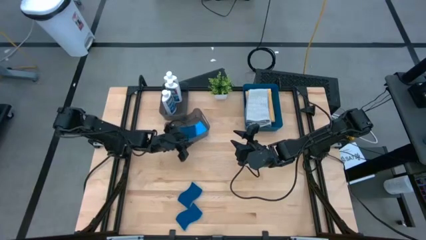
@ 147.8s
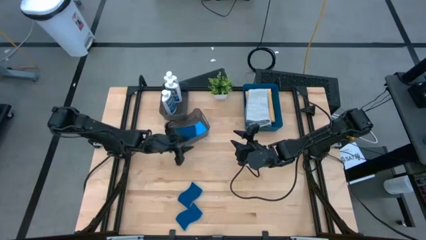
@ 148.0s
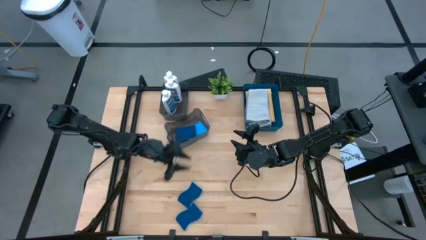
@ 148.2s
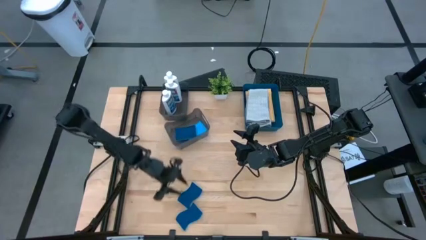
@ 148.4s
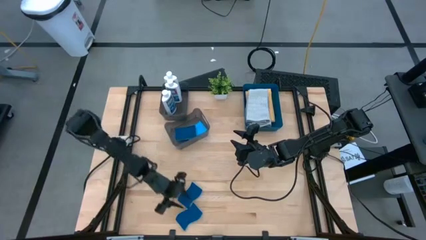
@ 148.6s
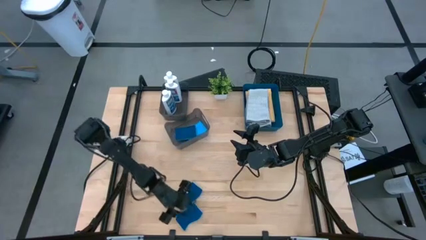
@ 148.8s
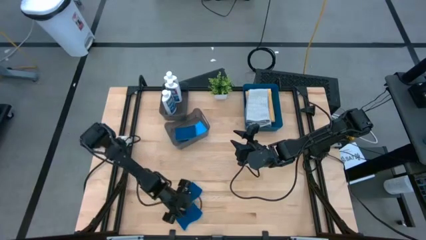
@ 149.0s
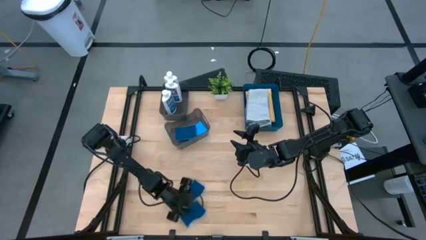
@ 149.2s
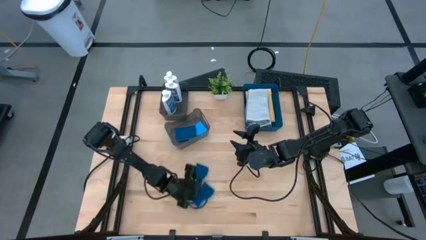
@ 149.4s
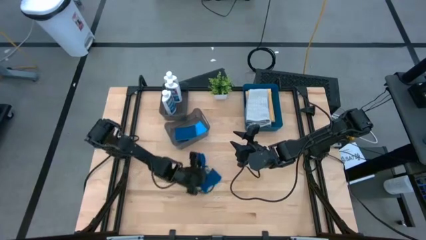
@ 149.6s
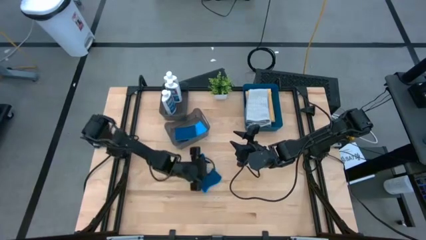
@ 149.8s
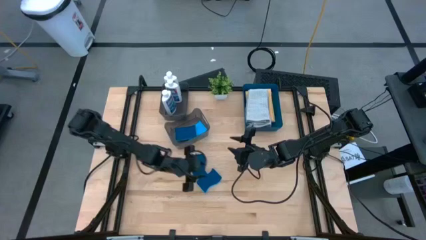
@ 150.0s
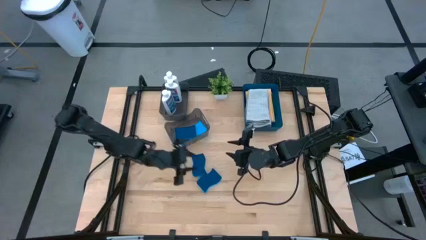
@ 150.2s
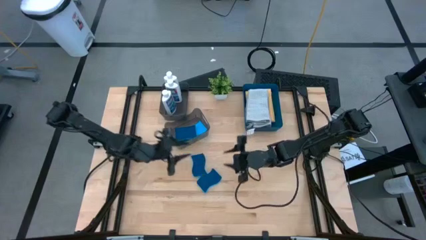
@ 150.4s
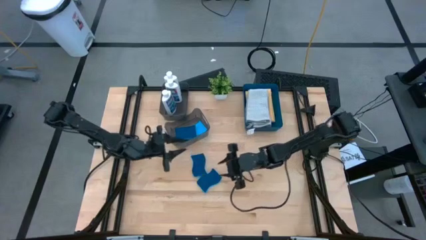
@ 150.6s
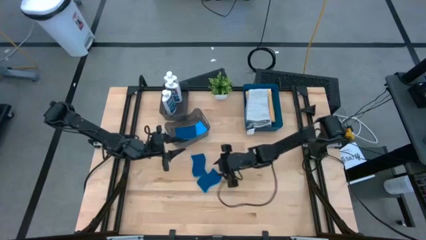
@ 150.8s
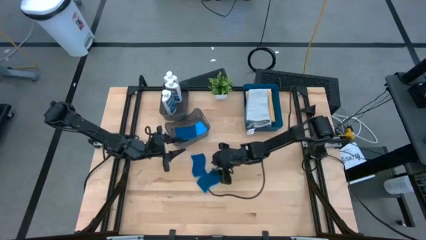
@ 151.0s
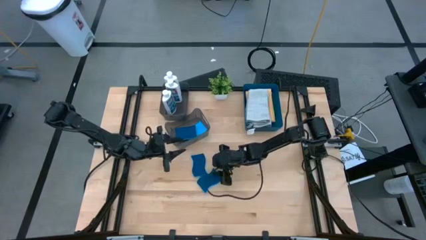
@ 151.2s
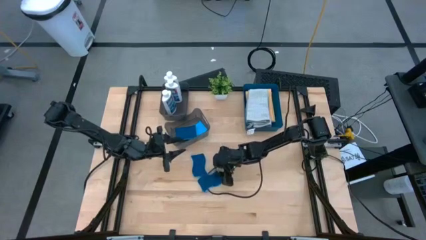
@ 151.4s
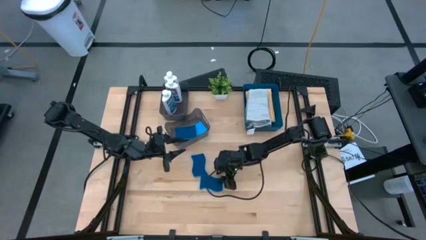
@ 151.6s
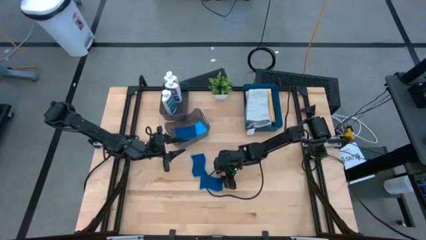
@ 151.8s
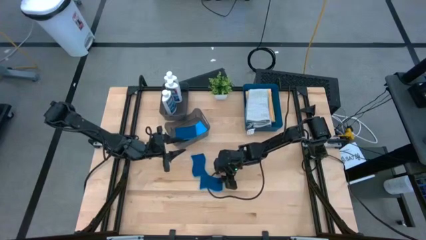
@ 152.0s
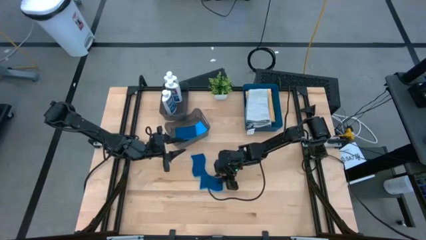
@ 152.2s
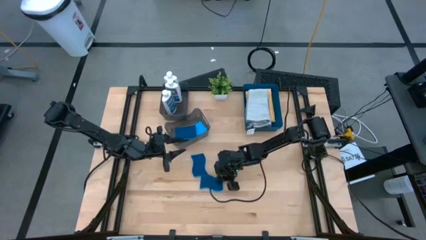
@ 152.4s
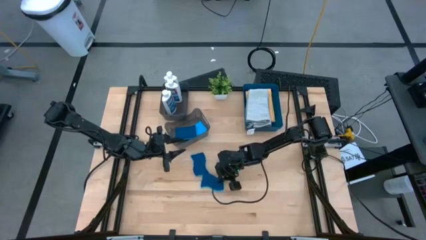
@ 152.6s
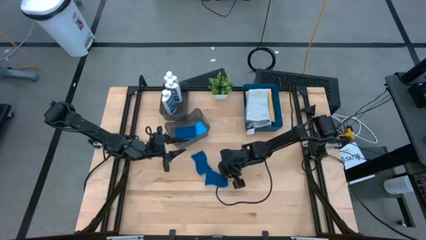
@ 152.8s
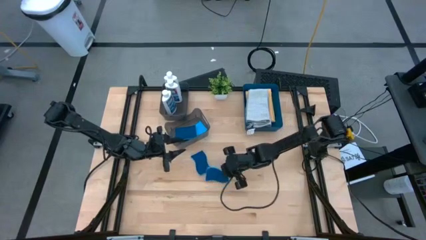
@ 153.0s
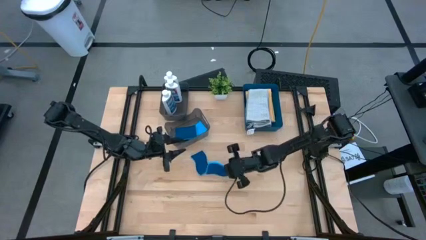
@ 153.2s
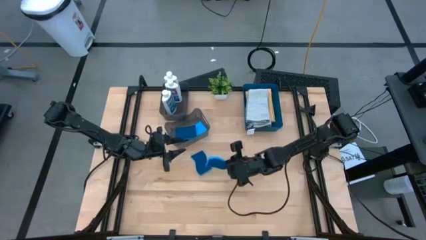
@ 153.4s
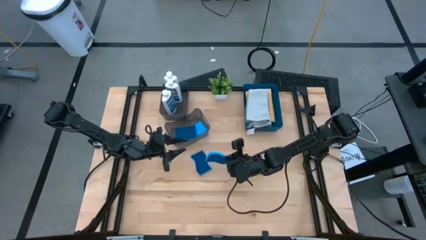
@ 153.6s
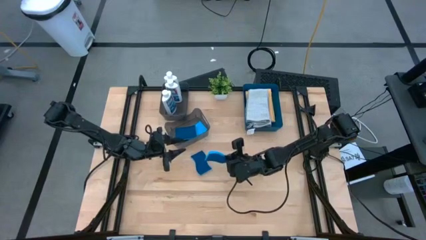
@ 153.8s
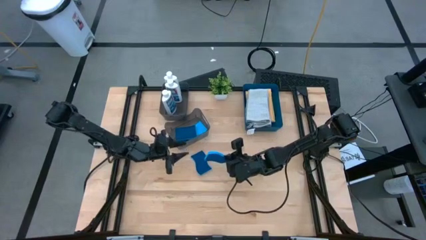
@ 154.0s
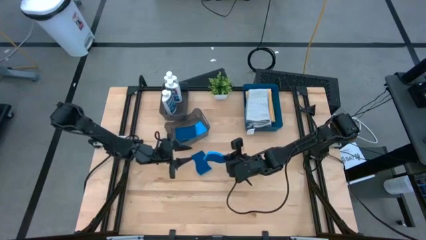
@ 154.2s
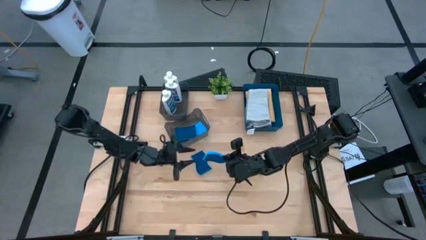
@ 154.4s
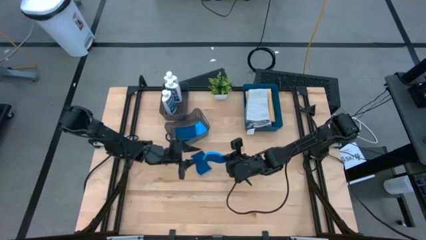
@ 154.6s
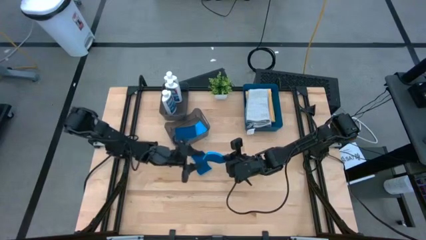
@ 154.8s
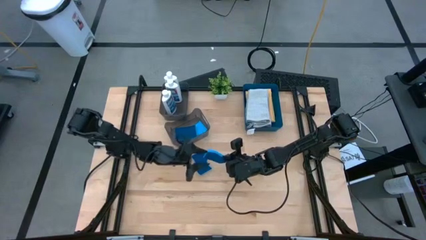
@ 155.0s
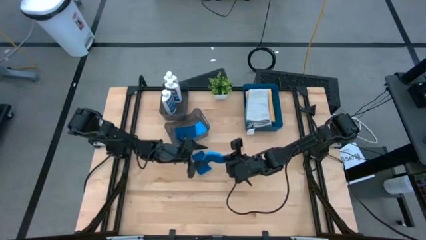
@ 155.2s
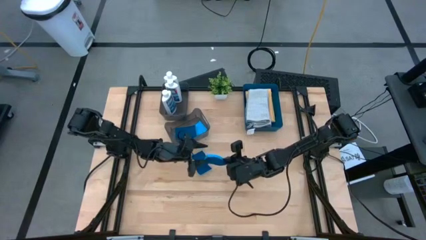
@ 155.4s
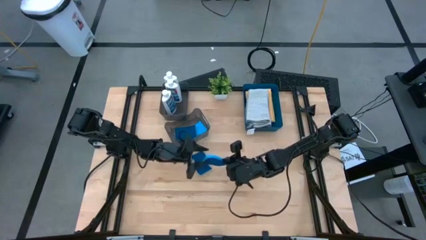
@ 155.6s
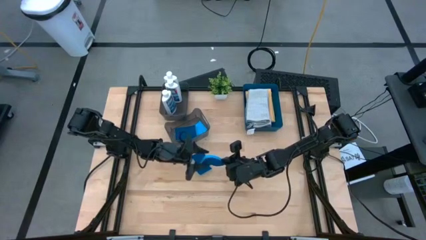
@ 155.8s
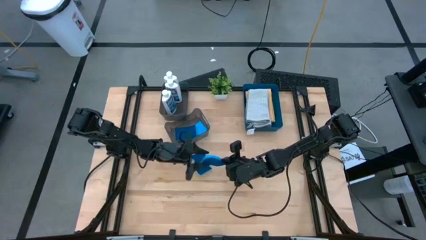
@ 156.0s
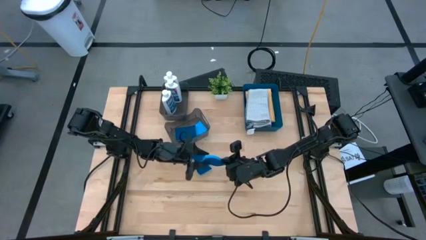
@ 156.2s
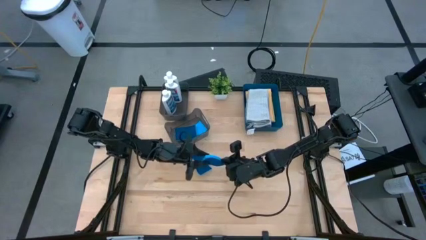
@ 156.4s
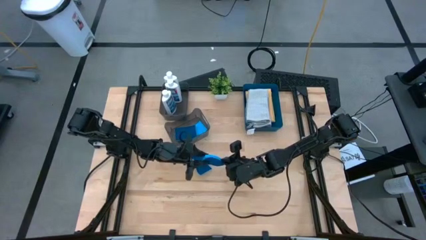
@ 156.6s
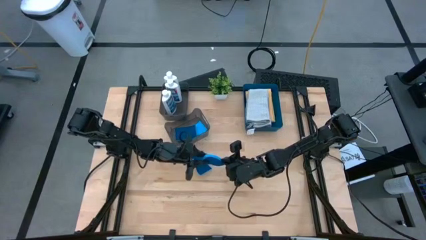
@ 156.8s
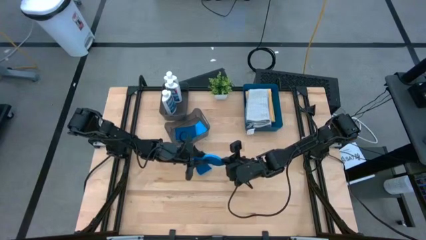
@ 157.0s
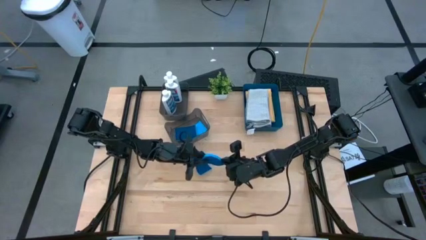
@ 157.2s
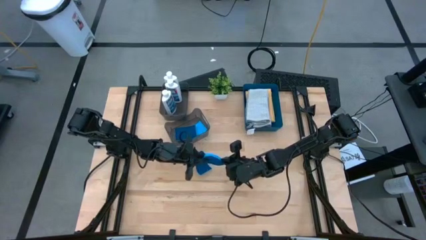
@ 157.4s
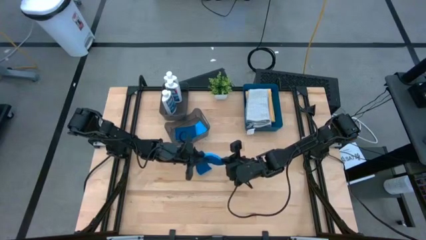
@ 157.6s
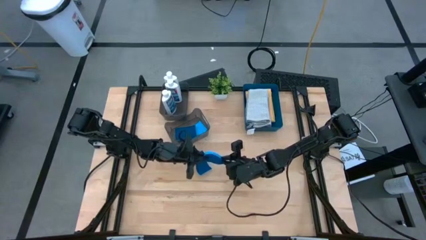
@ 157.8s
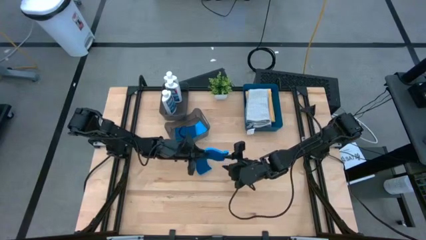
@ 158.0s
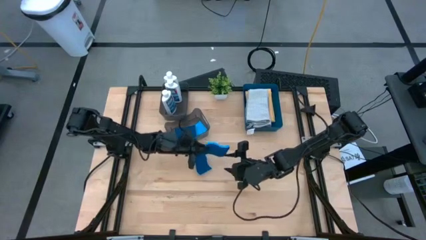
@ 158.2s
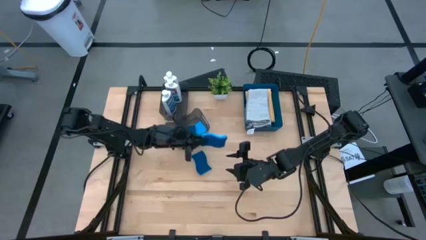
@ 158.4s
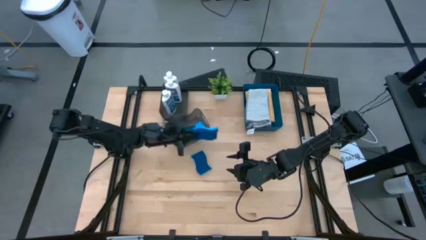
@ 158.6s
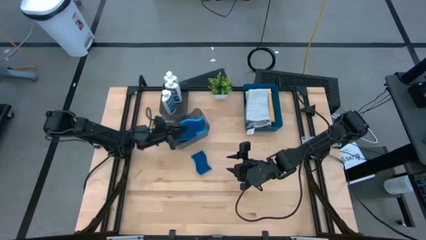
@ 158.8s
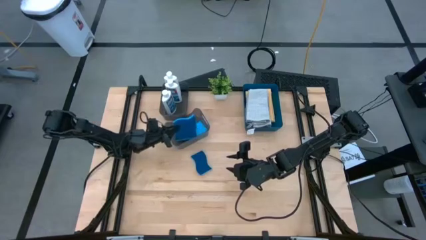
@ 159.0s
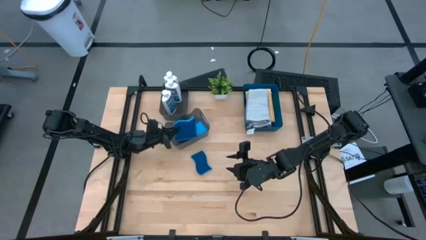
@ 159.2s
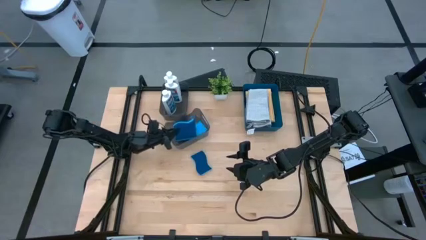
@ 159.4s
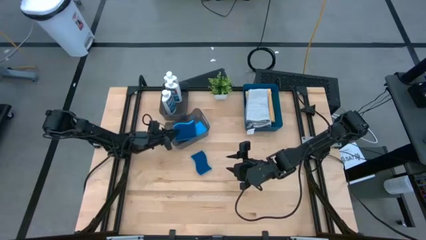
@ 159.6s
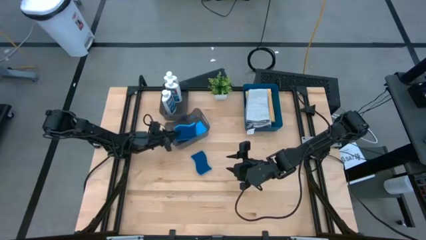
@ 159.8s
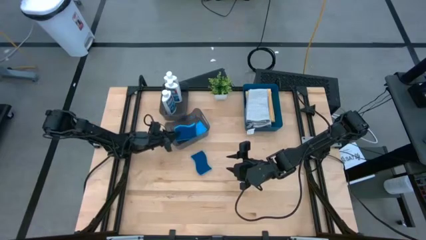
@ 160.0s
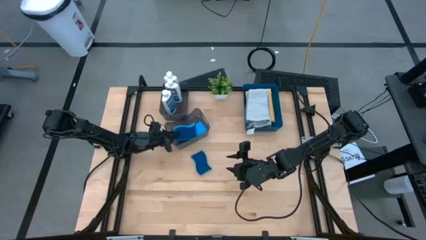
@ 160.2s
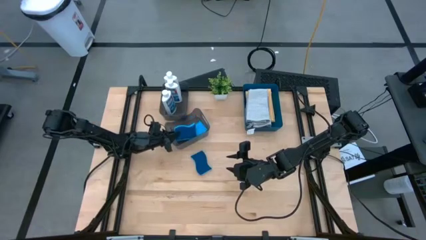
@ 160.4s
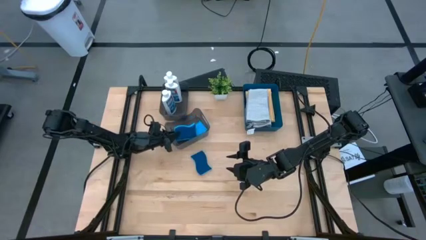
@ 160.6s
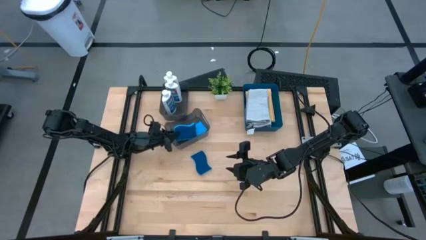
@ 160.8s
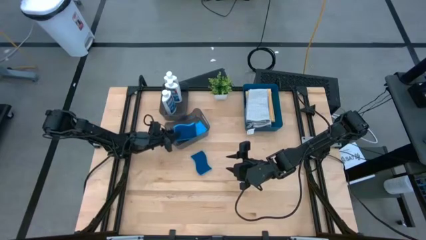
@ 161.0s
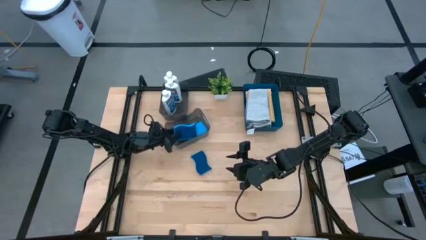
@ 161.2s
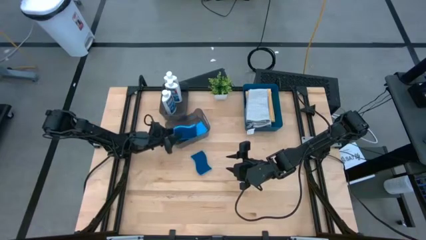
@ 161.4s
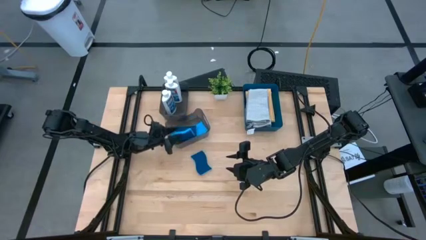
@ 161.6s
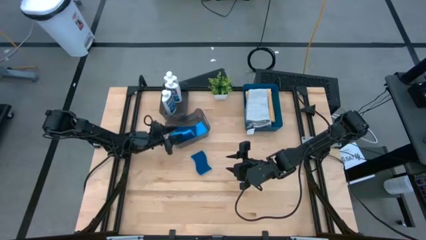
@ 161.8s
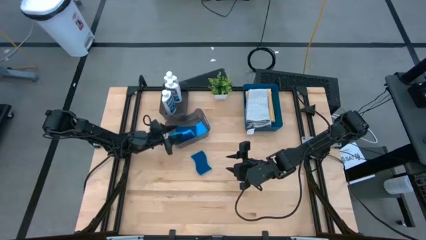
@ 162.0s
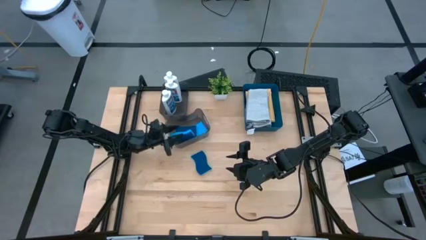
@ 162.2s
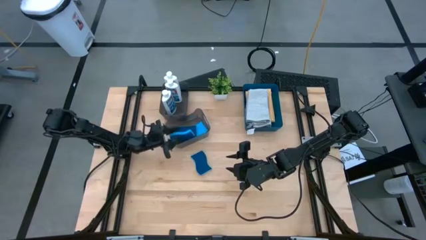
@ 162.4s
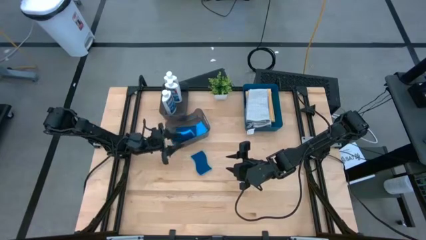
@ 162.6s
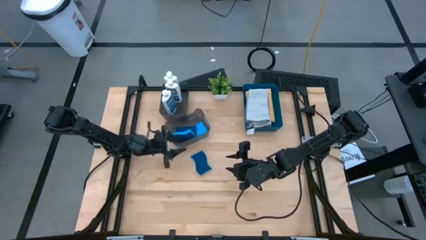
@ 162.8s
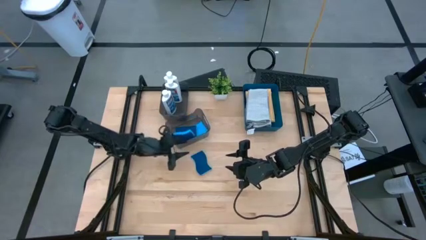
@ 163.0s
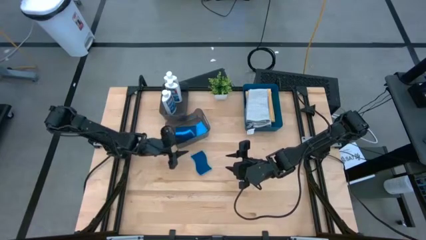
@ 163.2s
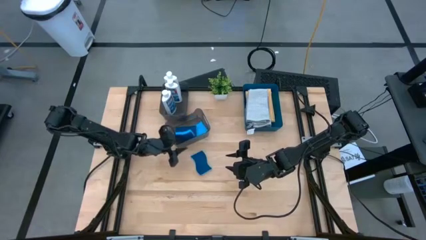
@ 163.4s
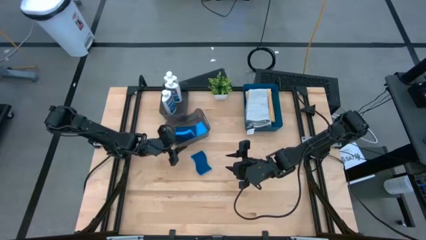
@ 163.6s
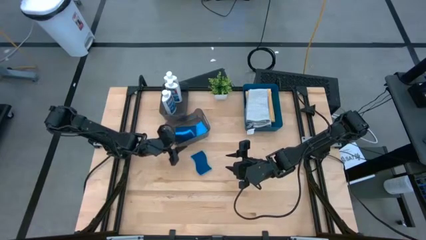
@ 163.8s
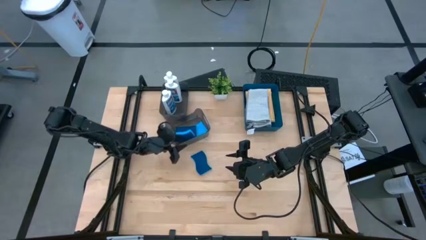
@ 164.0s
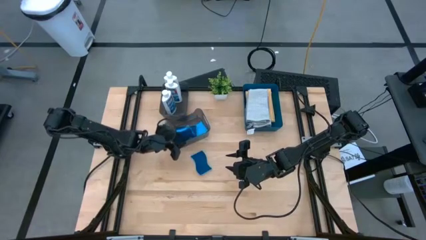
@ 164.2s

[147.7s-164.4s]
Task: Pick & Place Kitchen Items
Put the blue sponge into the bottom black bin
